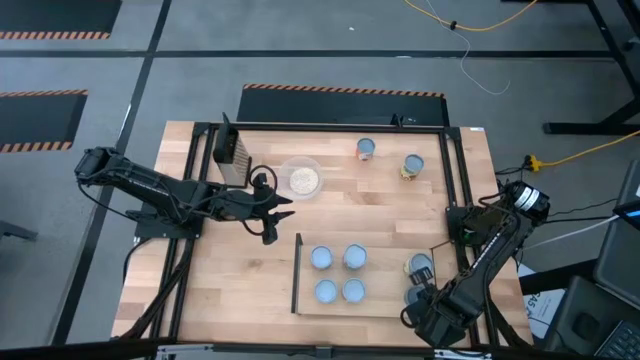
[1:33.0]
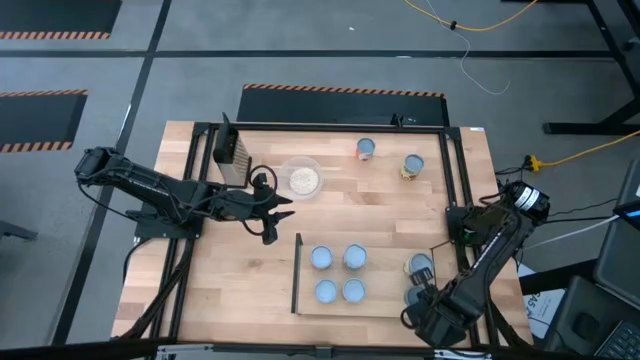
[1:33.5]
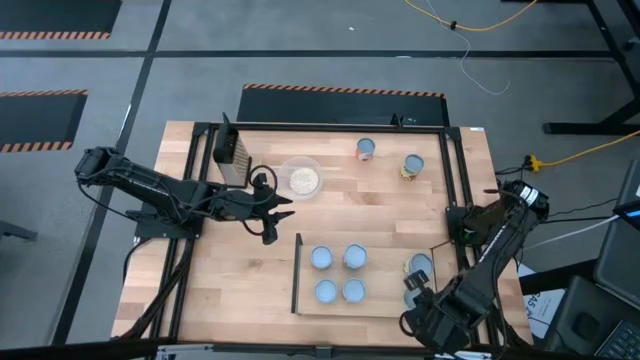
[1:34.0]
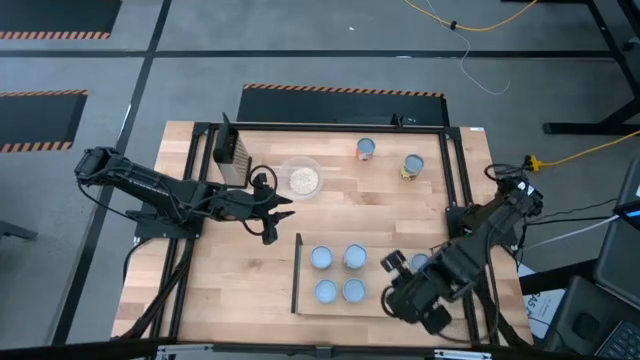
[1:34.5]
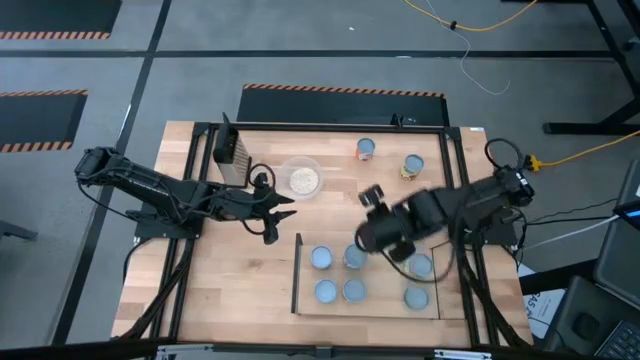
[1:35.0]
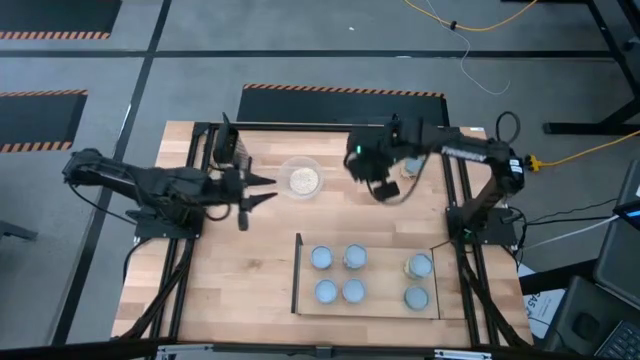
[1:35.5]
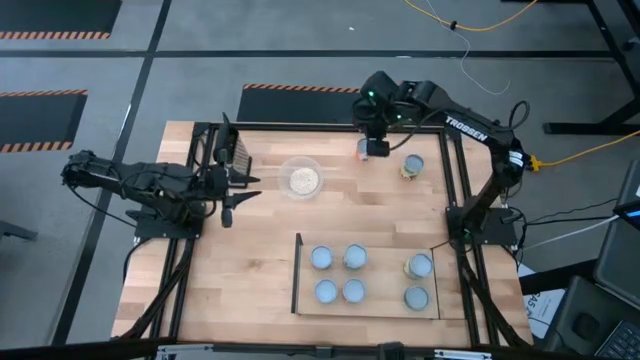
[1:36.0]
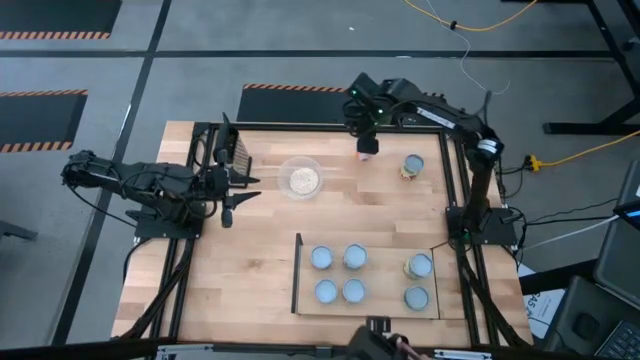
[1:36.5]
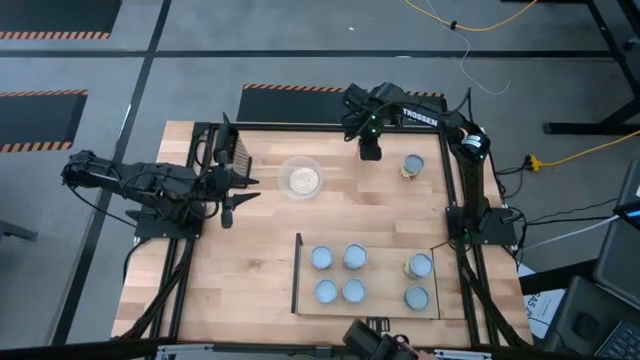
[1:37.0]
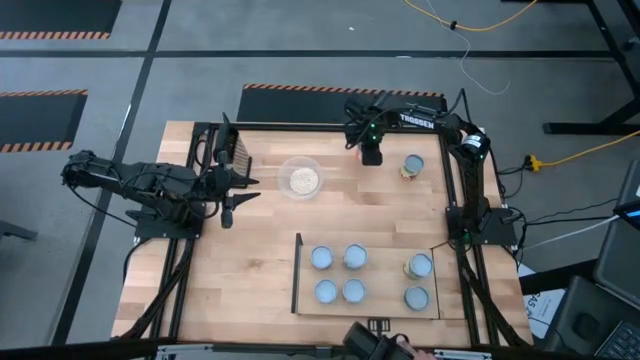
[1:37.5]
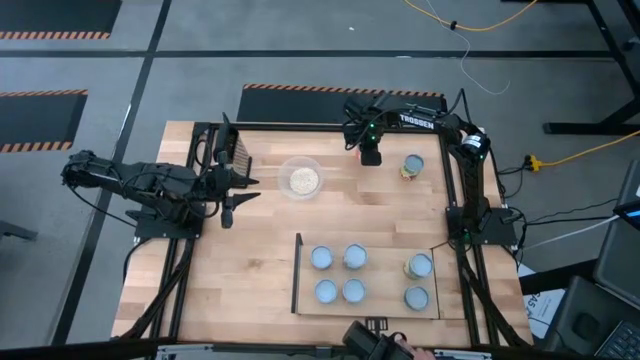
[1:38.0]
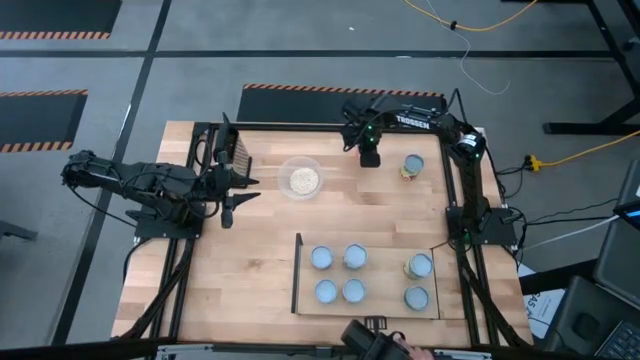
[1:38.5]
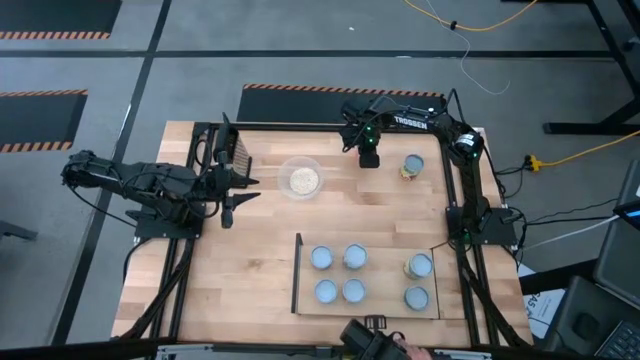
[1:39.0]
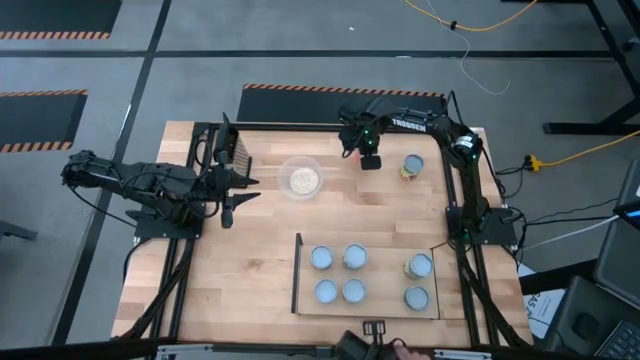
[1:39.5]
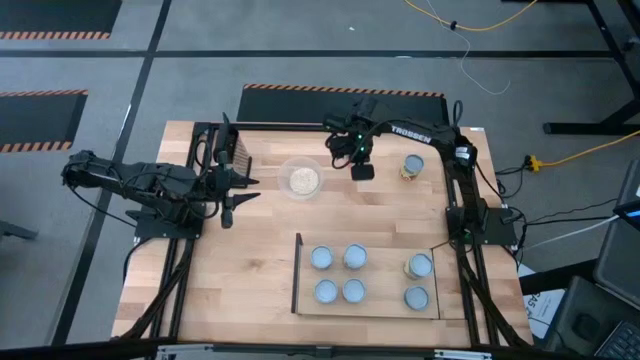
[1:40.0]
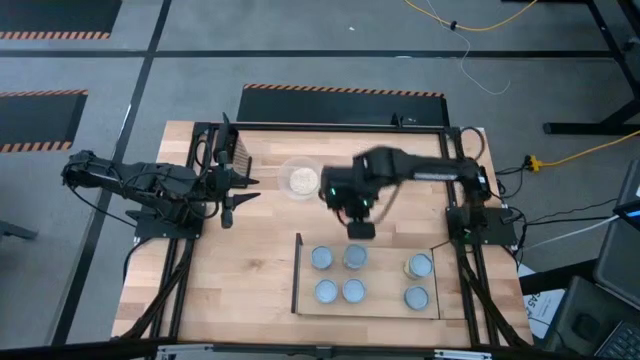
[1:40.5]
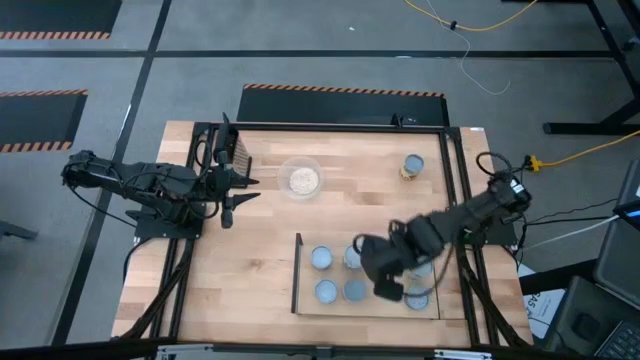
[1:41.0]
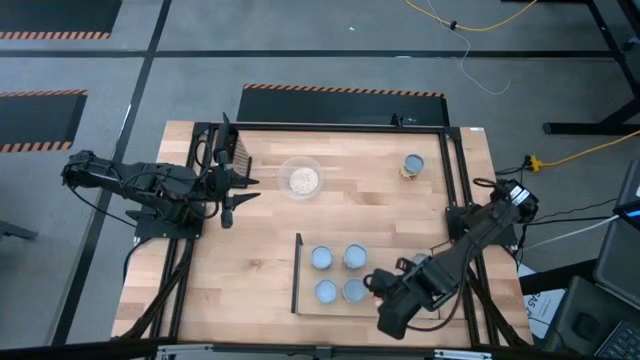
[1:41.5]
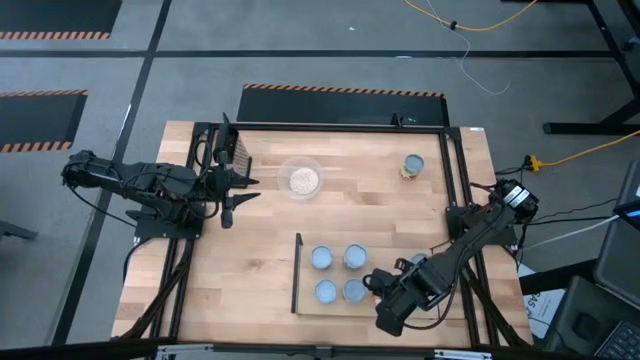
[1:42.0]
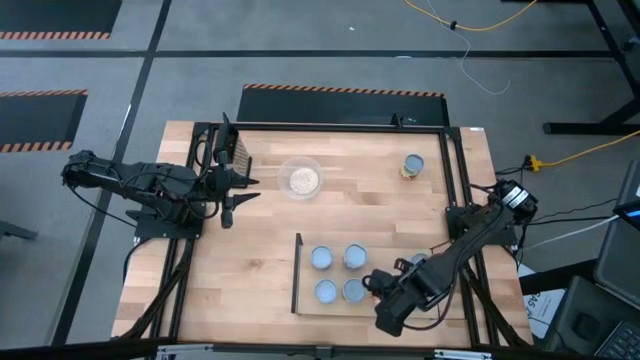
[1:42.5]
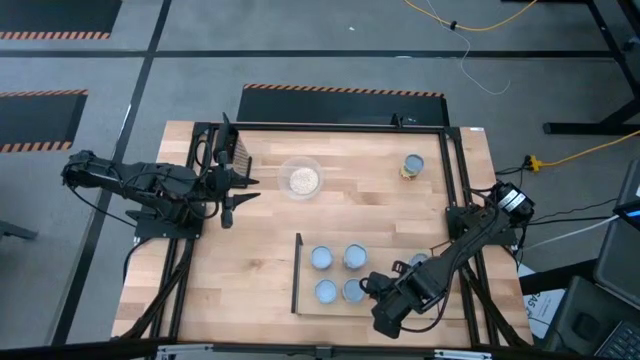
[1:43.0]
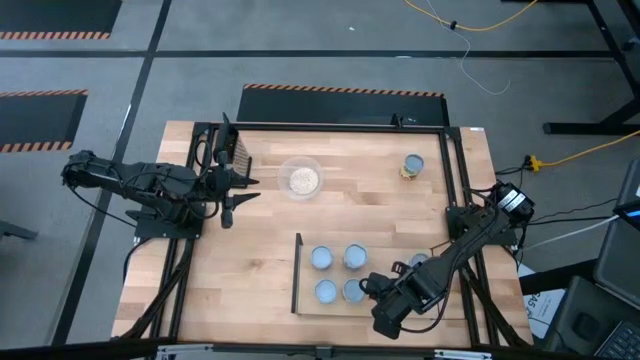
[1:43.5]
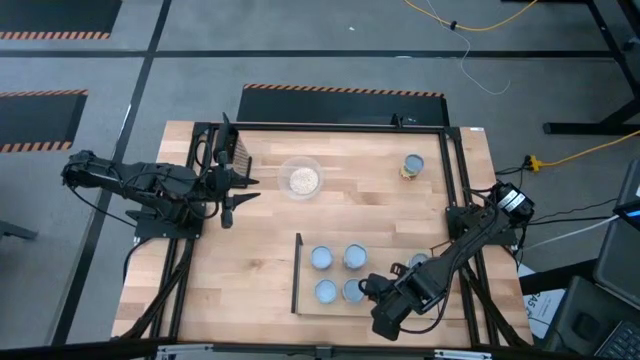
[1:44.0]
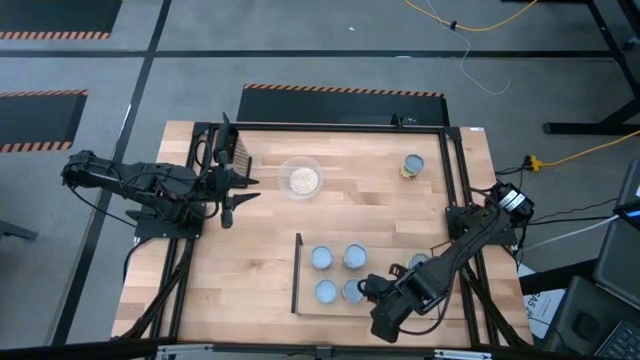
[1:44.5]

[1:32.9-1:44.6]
Task: Pick and place cans onto a shelf
Put the orange canned on the shelf

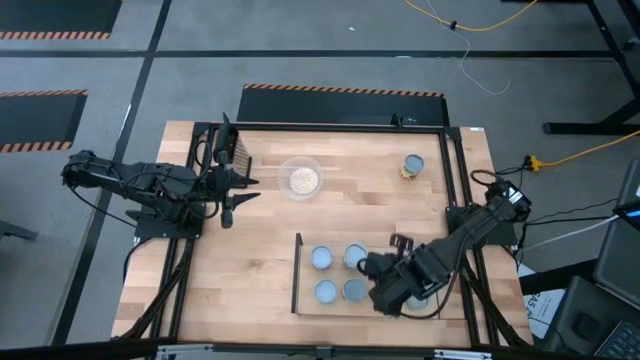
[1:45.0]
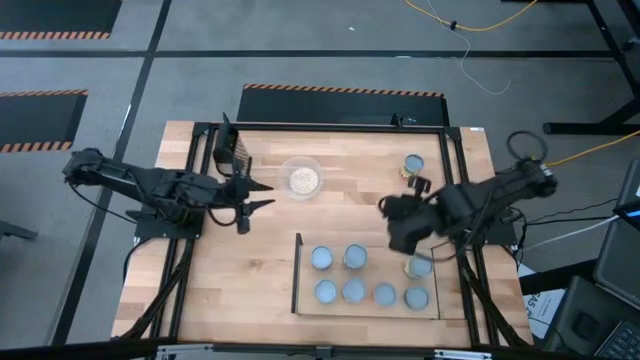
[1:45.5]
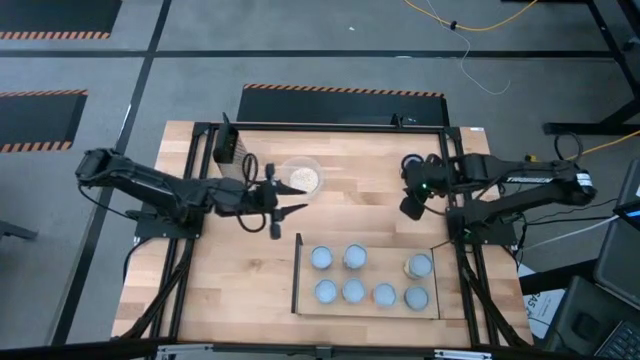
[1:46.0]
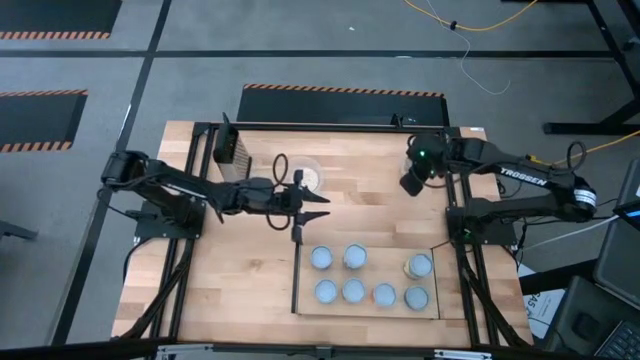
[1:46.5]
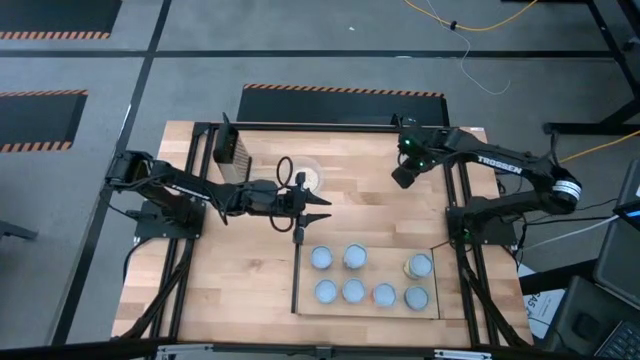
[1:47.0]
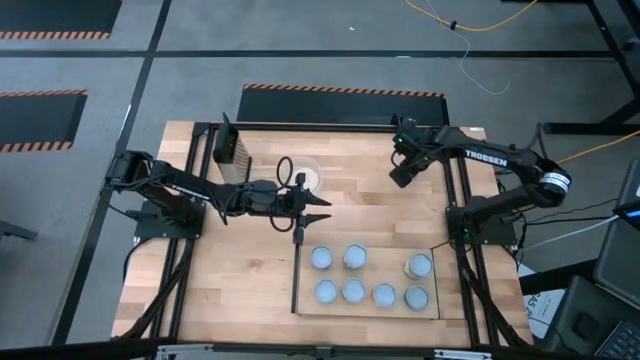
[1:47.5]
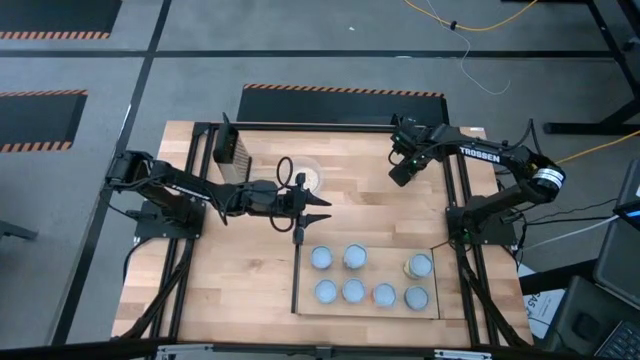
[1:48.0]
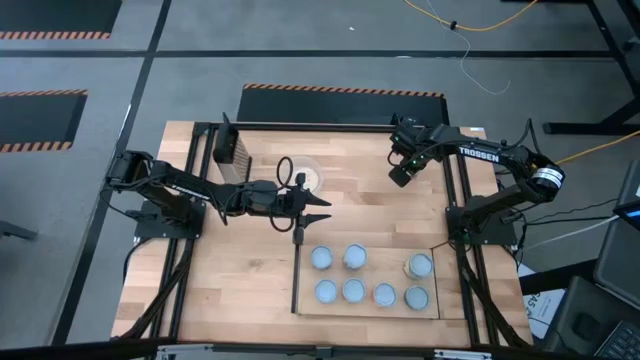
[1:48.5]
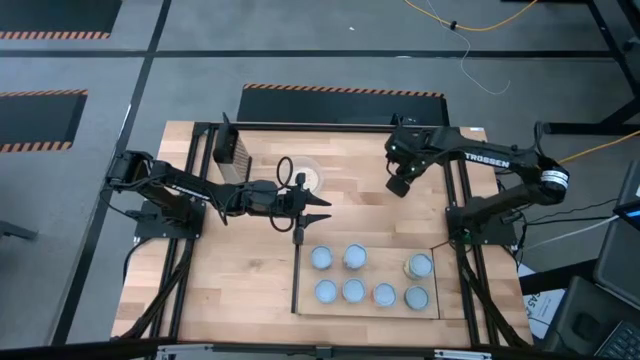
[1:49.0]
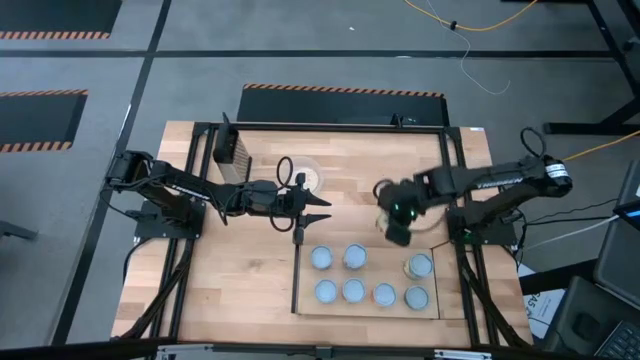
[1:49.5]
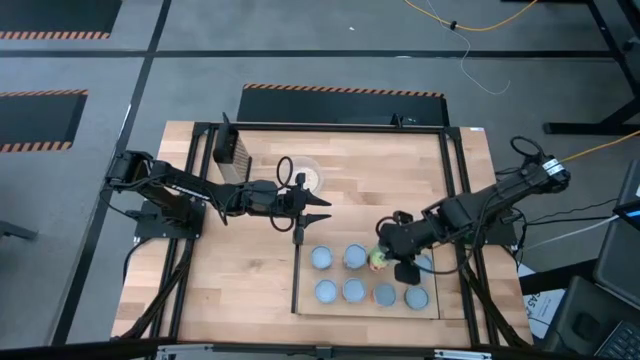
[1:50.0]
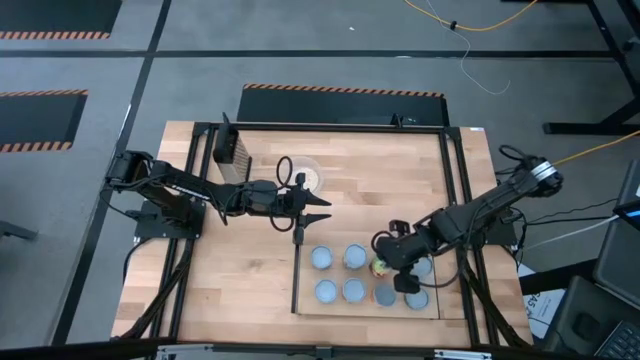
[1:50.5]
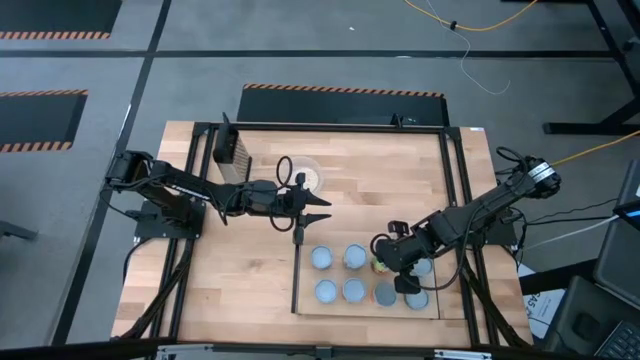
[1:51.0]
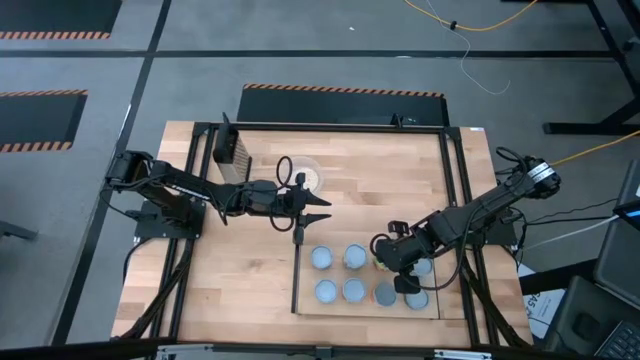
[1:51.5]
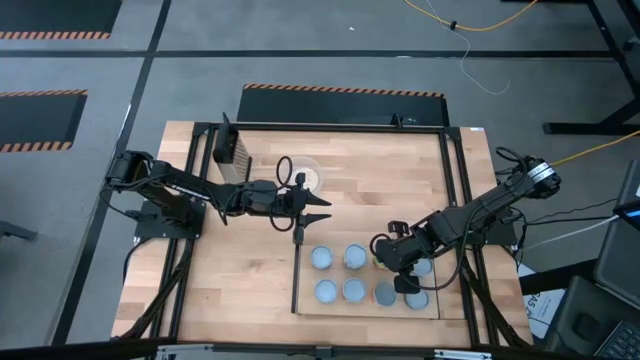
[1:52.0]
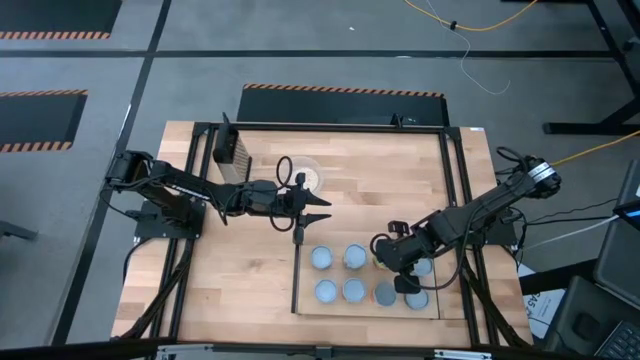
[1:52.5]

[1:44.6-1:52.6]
Put the canned spaghetti sauce can on the shelf

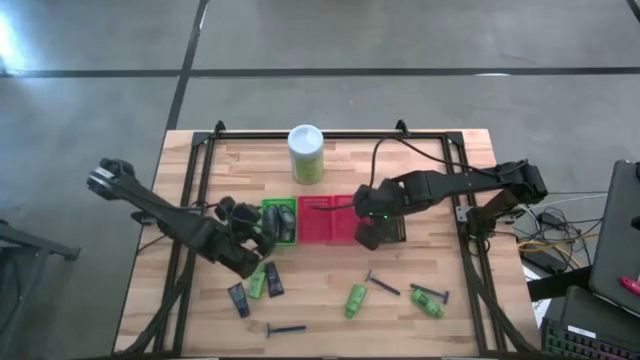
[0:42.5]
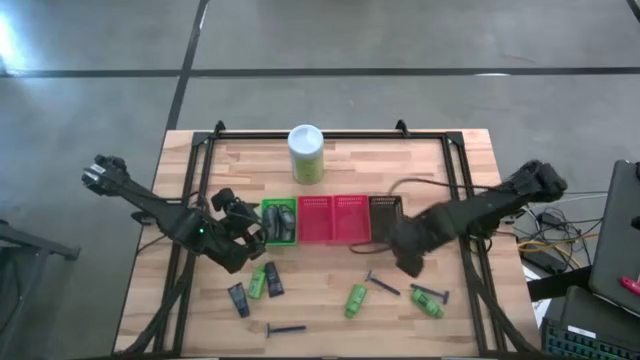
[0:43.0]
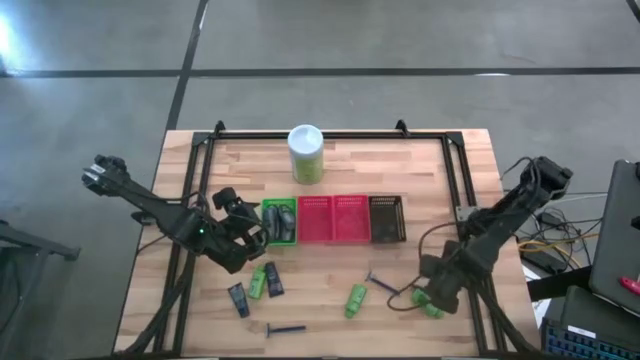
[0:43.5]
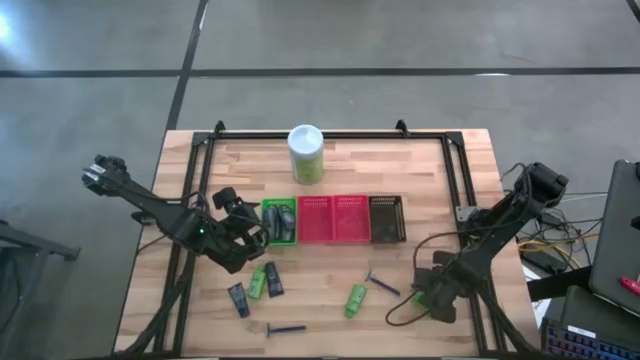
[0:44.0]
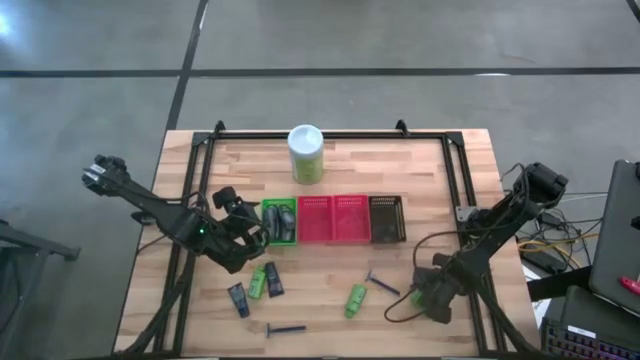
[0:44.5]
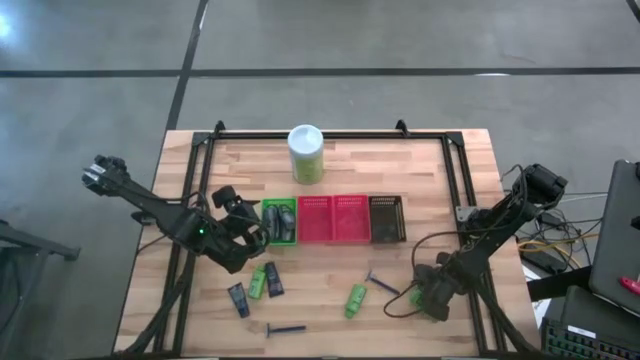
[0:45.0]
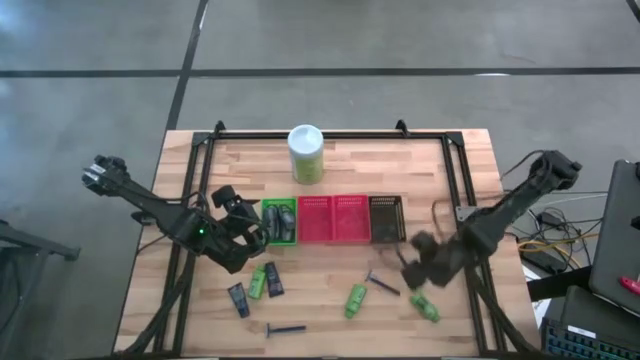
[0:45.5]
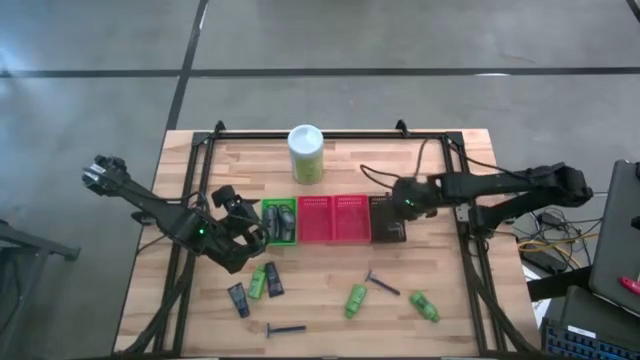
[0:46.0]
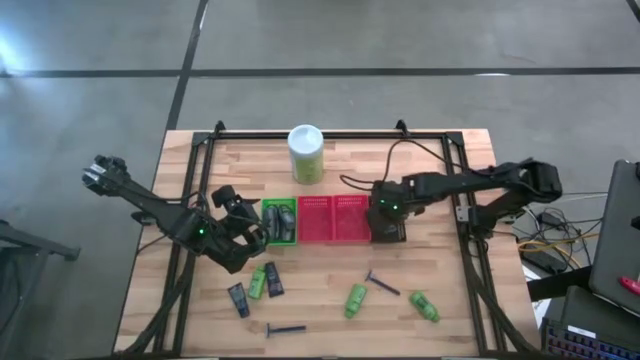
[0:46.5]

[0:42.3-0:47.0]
Task: Pick & Place Travel size toiletries
Put the blue razor into the black bin
